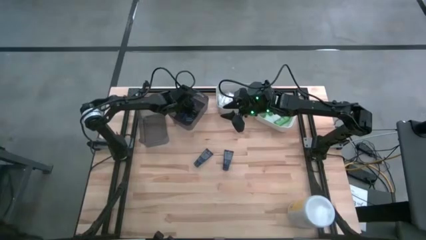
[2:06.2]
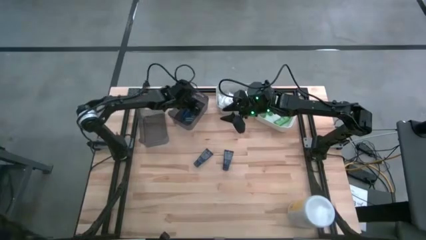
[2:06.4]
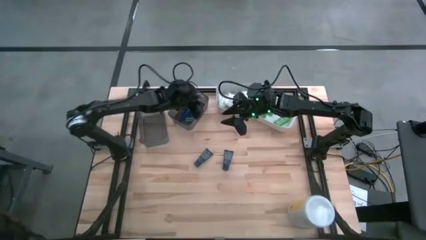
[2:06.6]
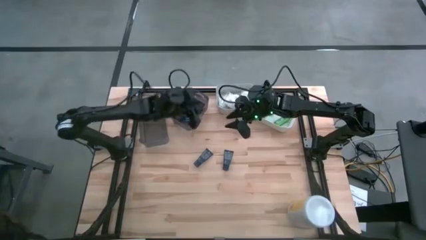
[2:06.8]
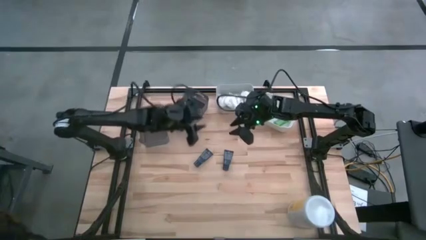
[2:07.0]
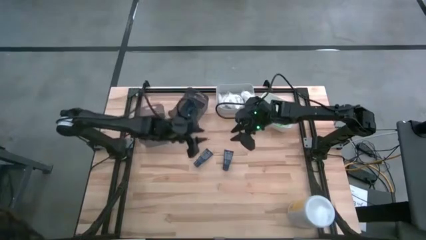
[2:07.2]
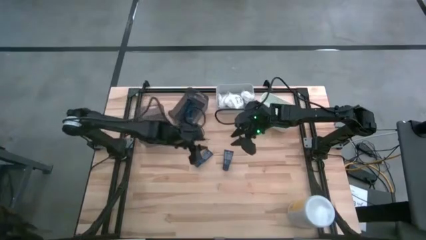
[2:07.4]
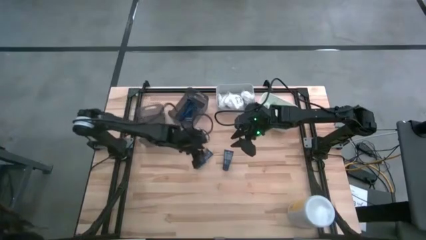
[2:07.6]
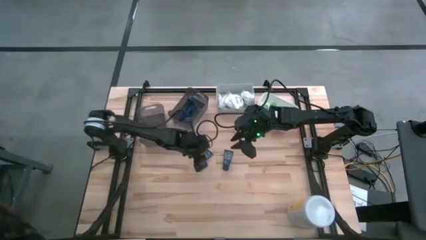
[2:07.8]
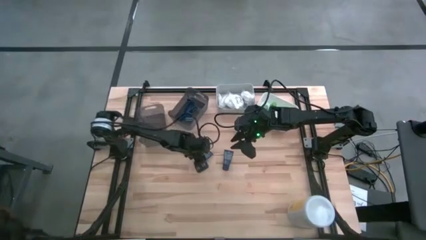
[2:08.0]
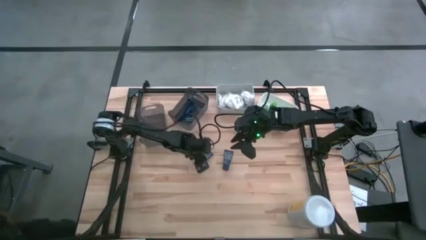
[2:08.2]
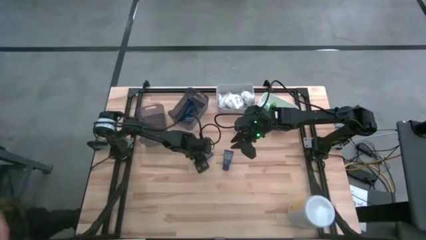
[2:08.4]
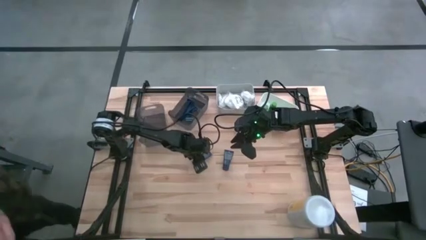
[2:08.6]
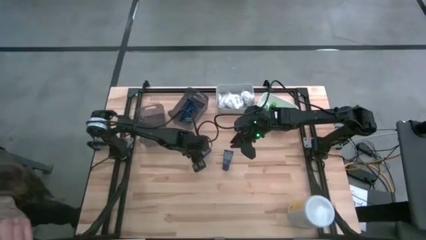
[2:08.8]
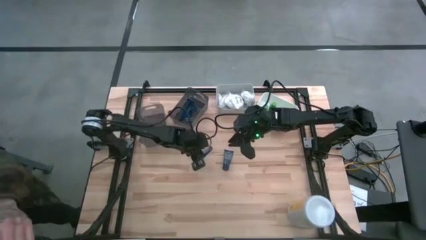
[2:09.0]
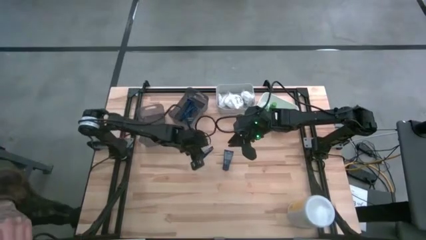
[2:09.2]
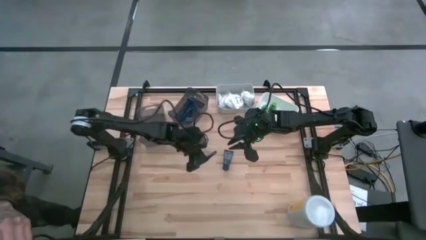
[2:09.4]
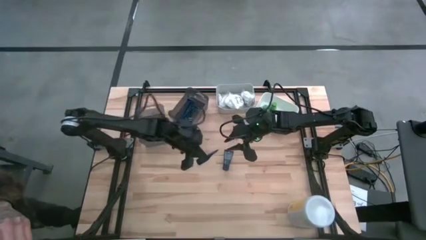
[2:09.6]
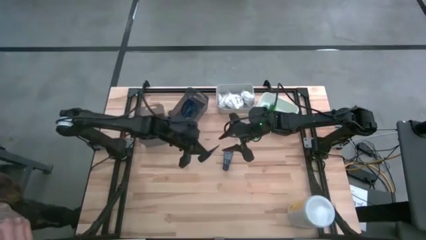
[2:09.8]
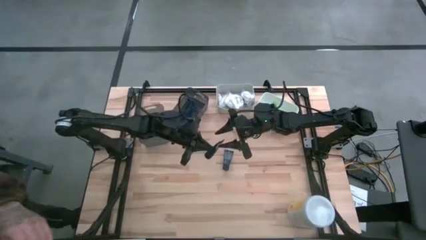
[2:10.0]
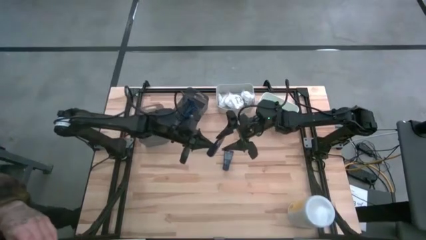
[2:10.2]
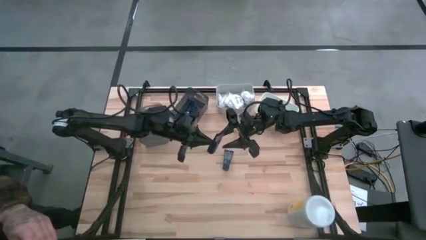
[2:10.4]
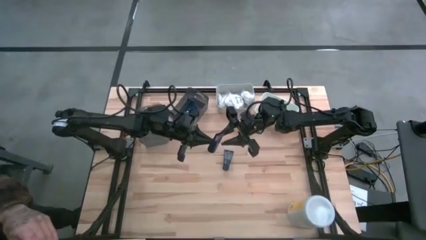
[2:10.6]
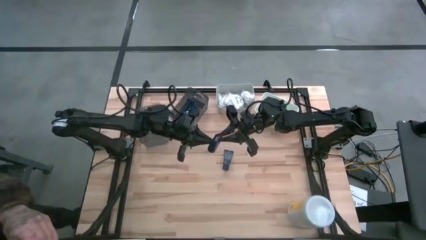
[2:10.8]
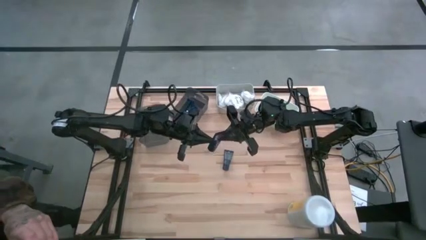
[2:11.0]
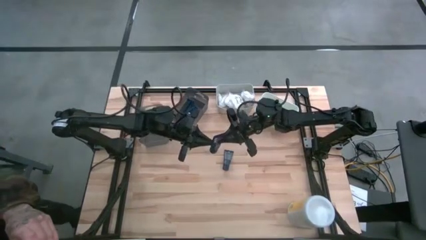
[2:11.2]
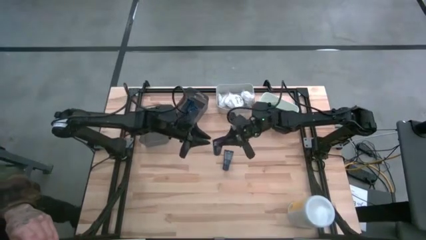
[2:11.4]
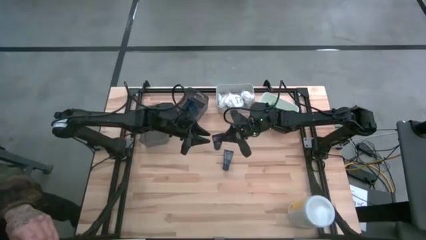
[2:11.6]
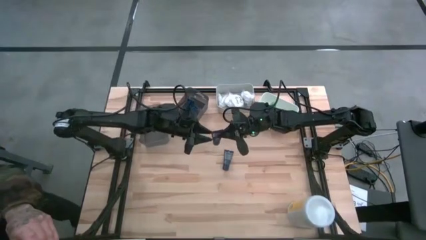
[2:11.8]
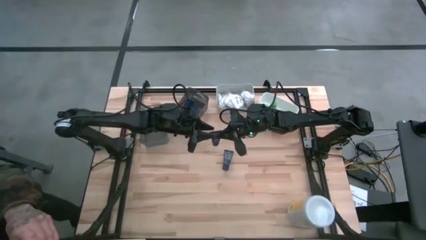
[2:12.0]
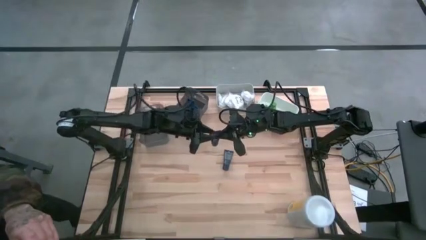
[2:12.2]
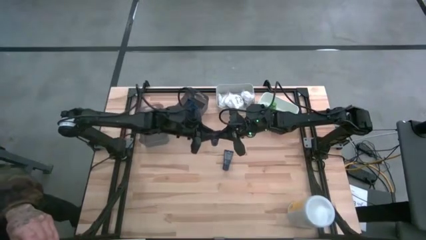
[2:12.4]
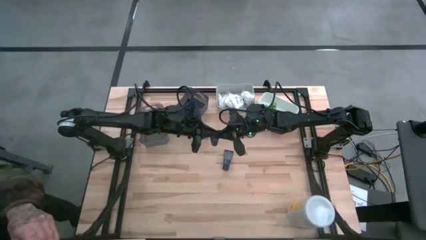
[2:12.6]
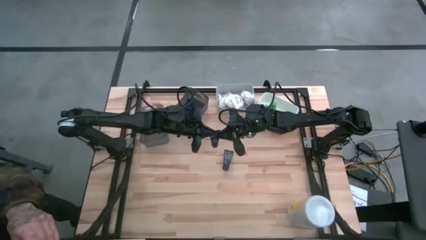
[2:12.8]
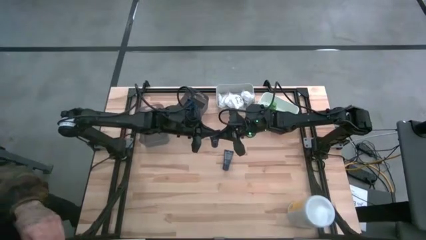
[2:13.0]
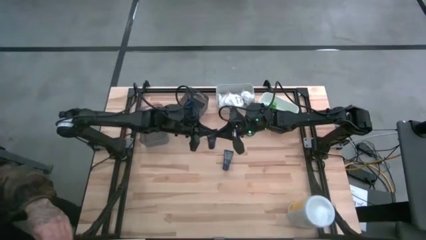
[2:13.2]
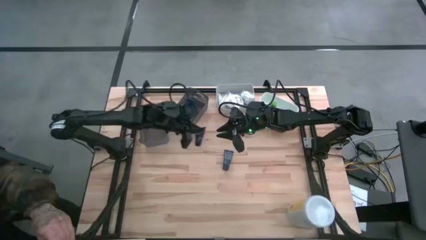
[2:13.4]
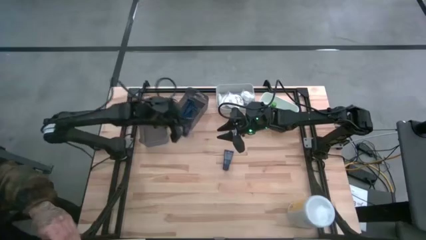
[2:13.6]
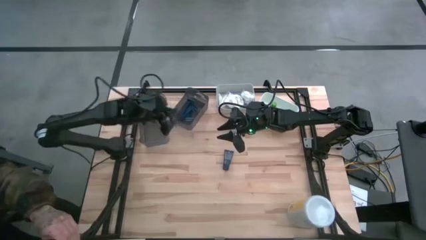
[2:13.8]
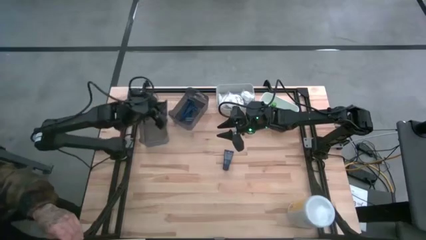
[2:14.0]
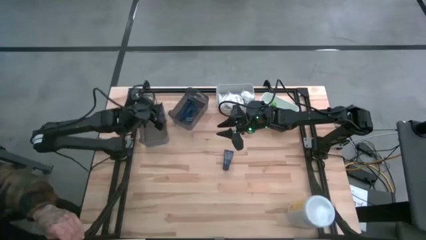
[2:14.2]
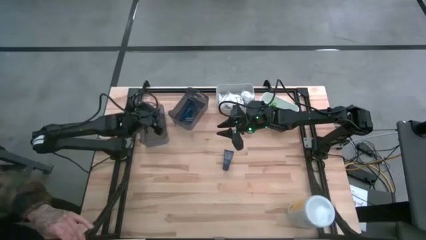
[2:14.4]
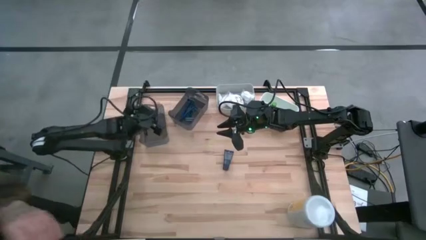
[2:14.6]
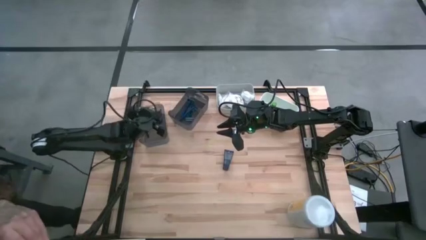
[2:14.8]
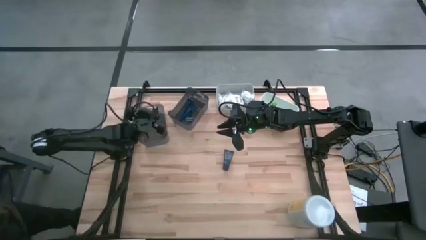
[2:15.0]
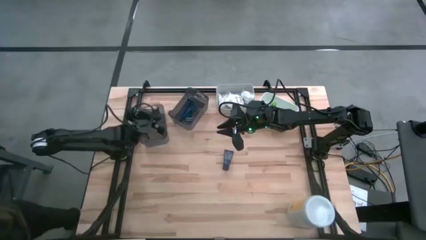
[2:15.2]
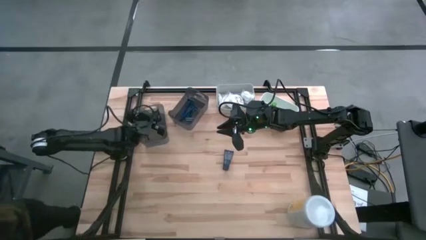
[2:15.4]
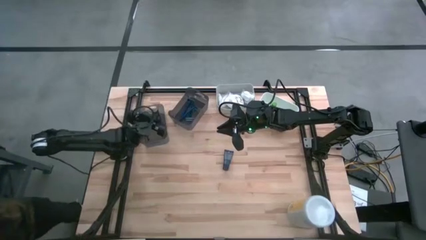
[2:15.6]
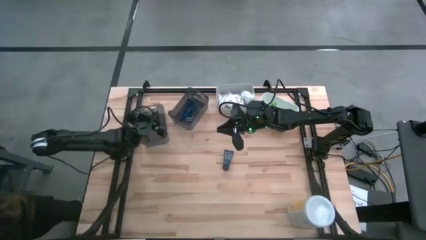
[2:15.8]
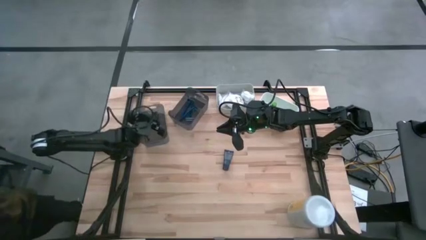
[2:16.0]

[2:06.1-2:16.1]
Task: Pick & Place Travel size toiletries
Put the left shaving cream into the left black bin
